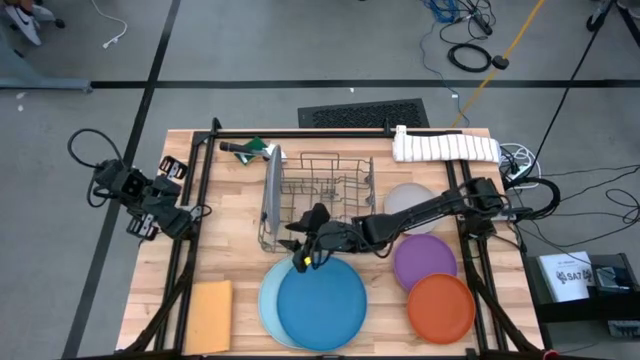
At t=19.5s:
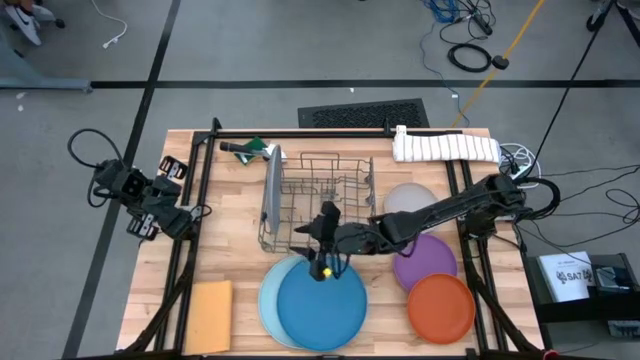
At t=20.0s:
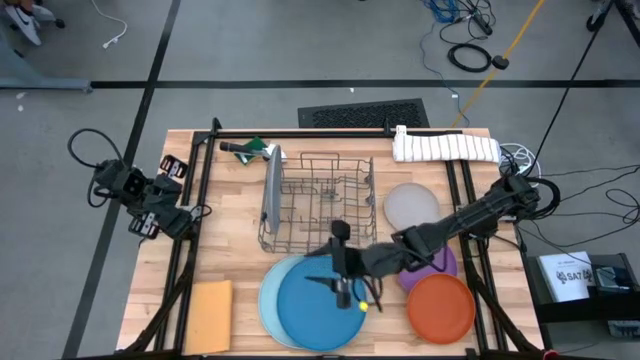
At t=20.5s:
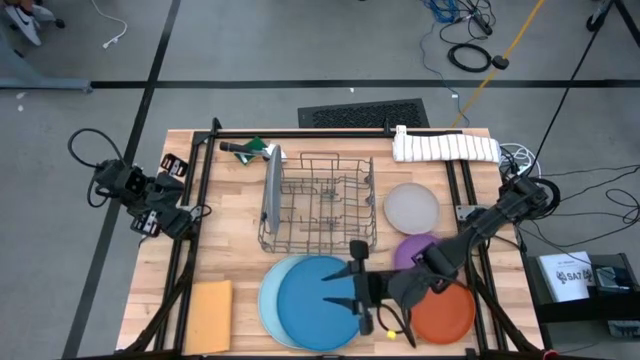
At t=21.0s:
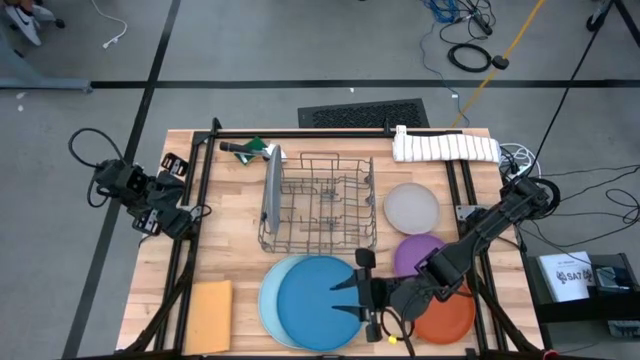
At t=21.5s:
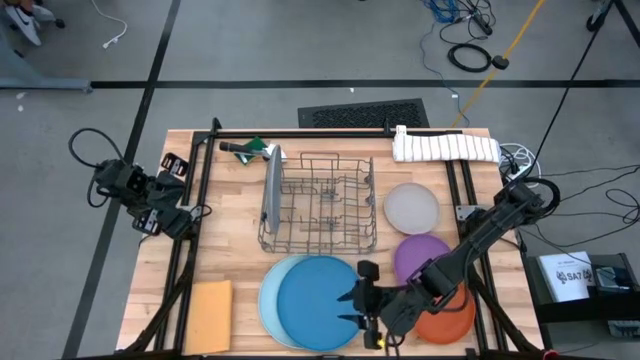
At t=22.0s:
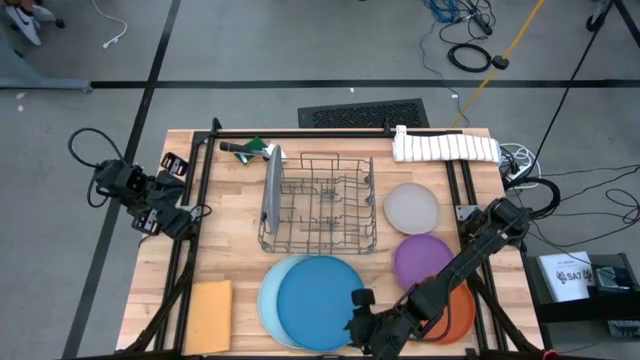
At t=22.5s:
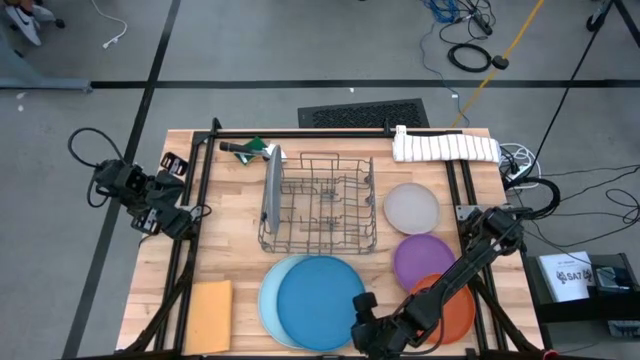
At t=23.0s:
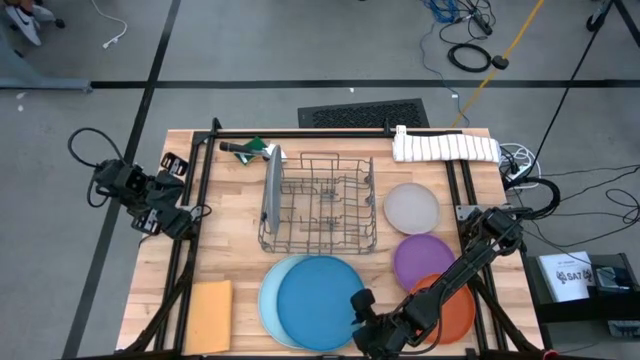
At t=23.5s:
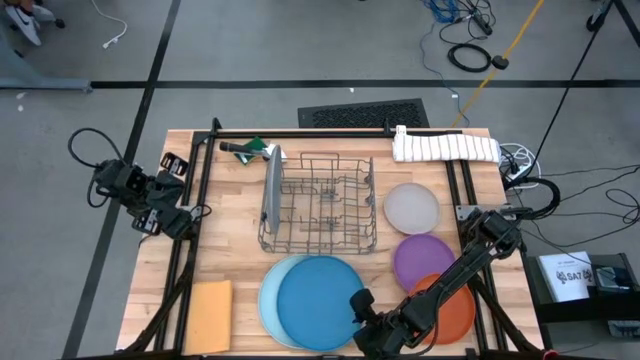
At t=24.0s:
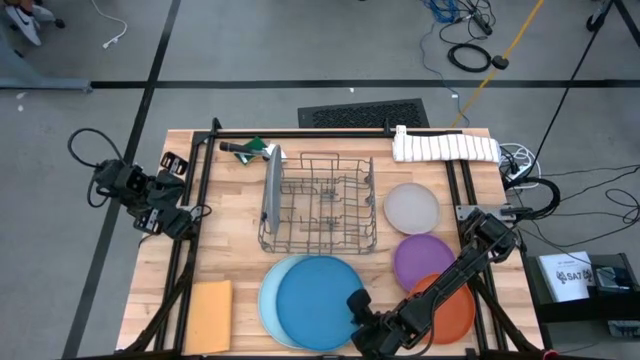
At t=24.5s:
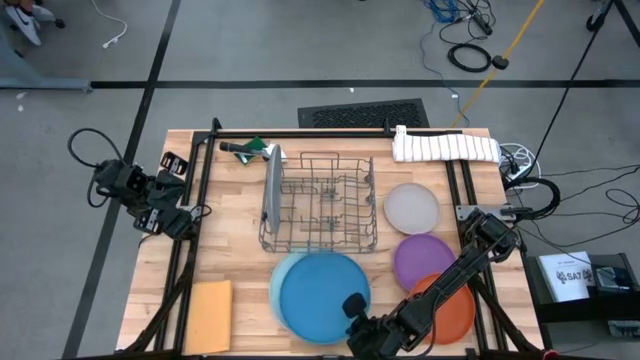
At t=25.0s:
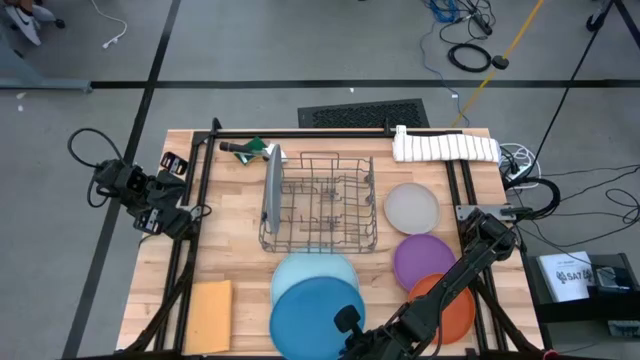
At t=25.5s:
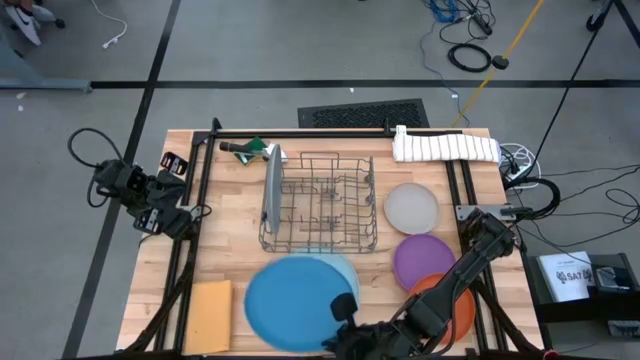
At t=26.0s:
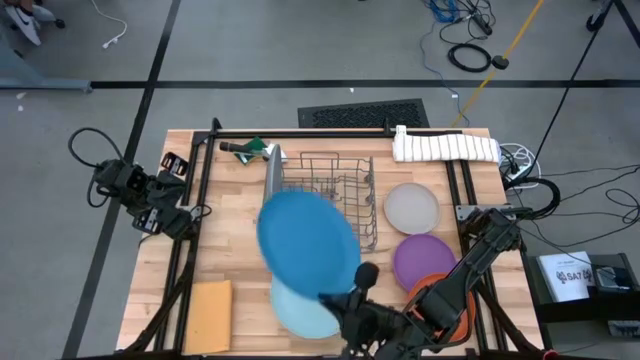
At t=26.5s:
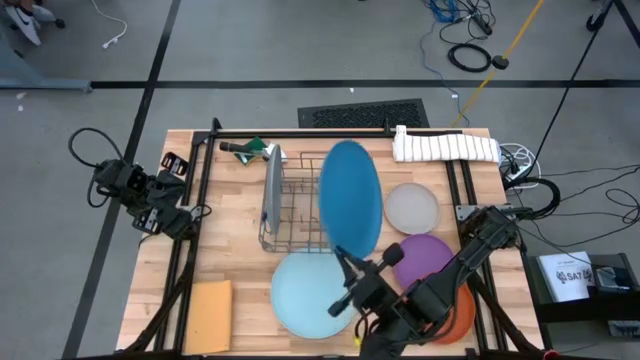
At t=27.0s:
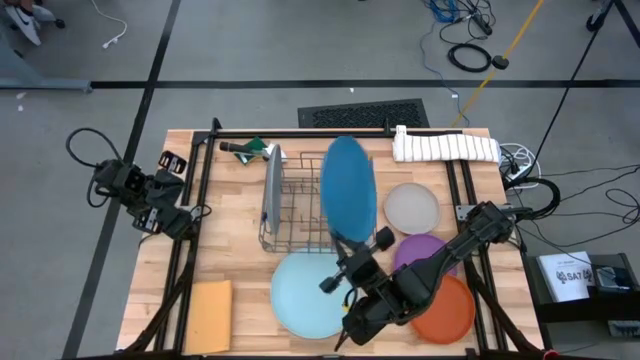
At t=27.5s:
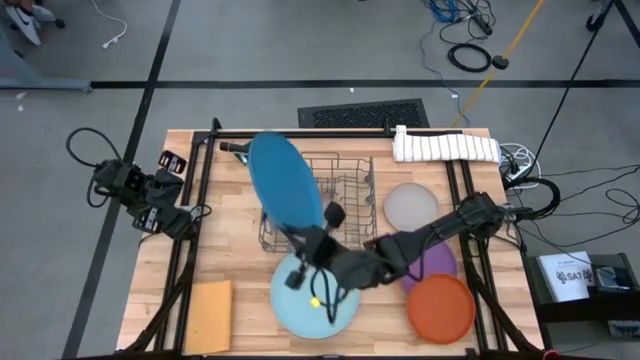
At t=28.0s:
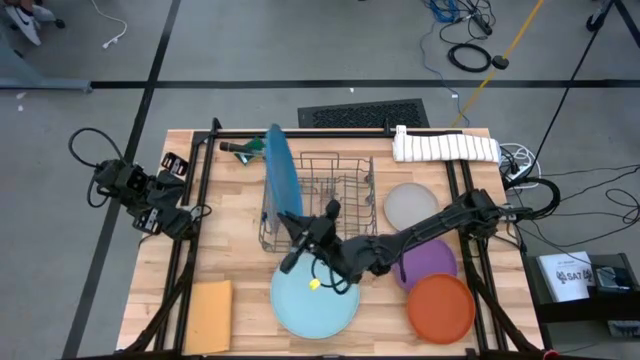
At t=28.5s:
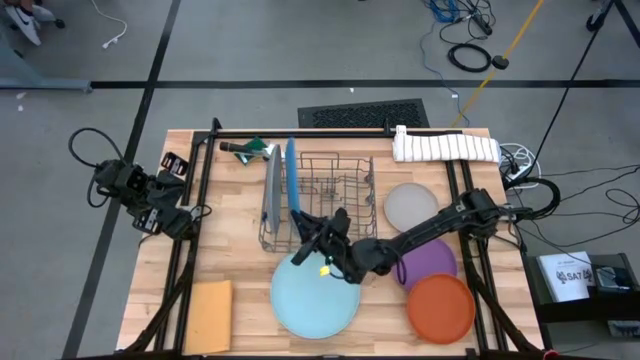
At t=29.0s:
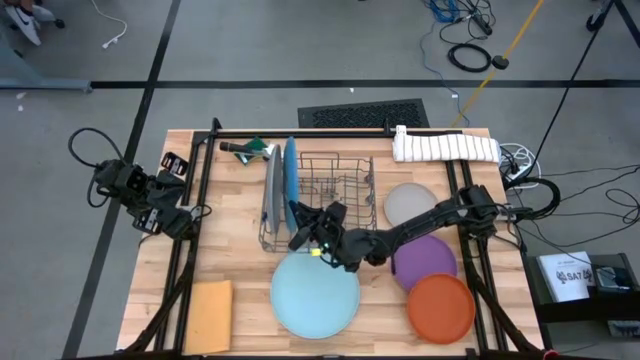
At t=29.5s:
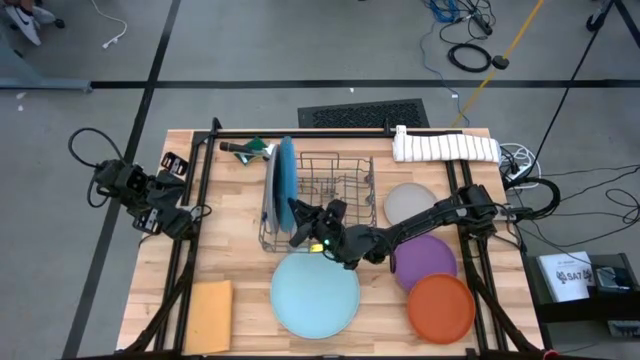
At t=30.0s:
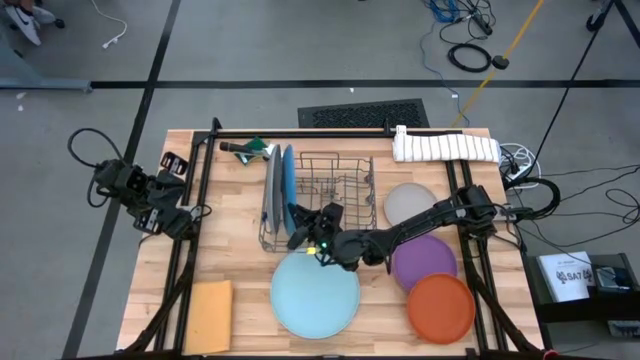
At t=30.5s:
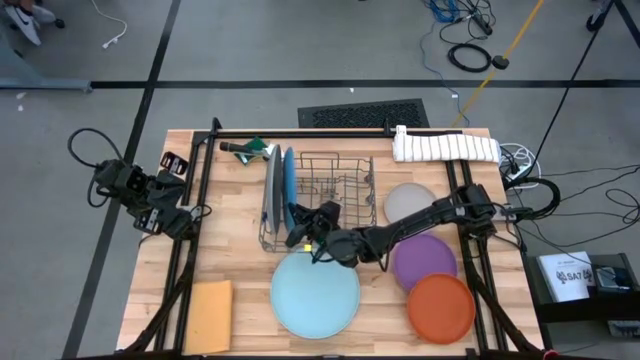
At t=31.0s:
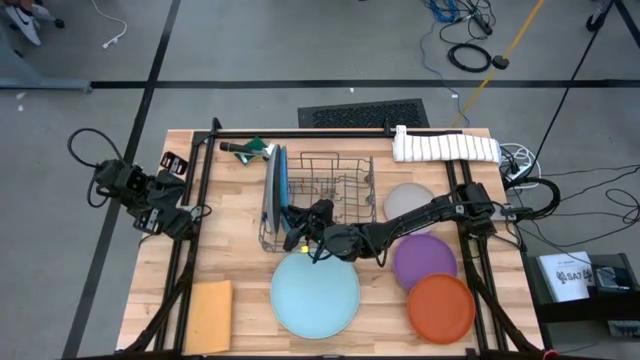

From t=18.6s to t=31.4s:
Task: Sort dishes
Put the blue plate into the green dish rack

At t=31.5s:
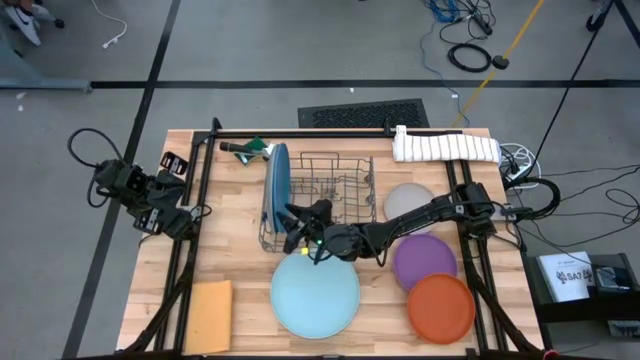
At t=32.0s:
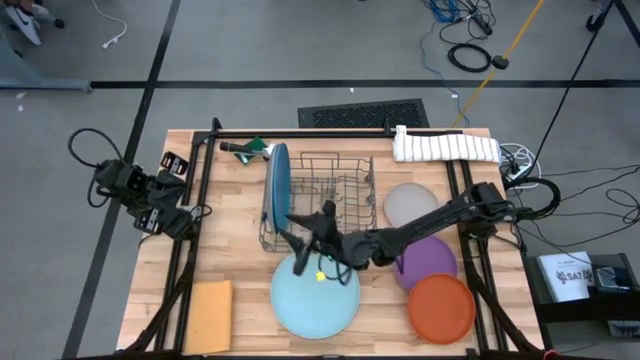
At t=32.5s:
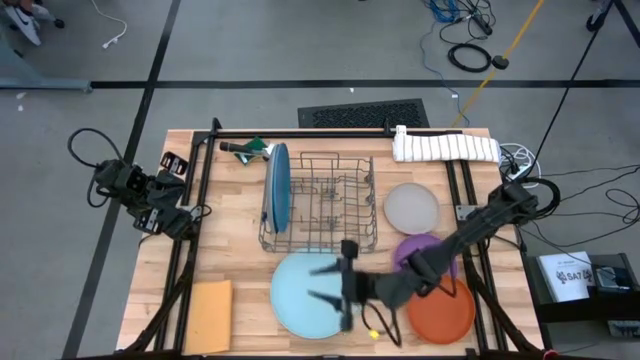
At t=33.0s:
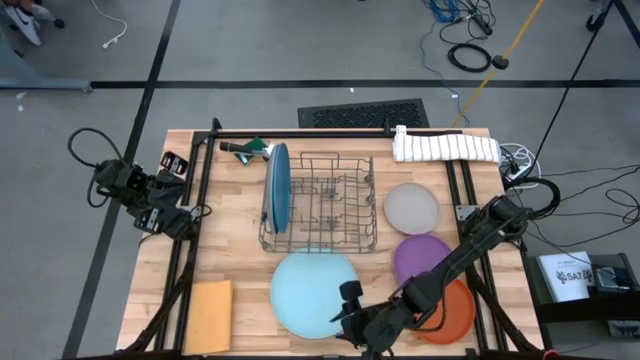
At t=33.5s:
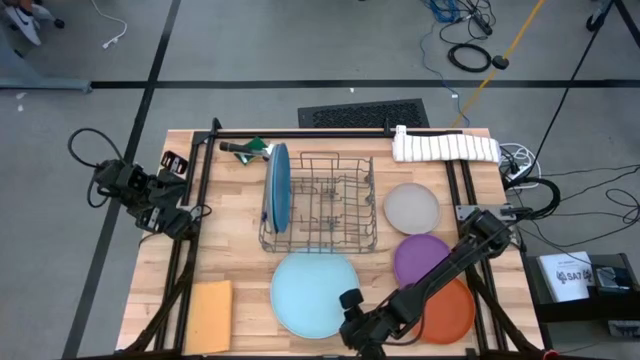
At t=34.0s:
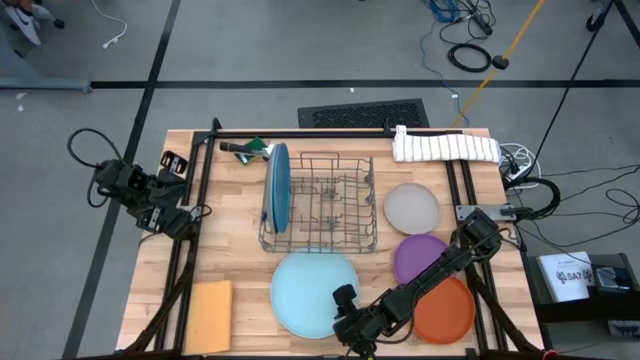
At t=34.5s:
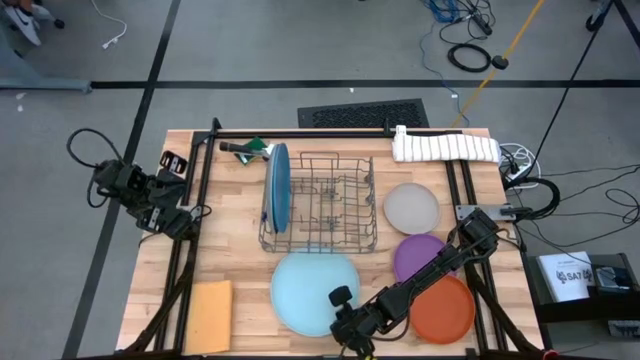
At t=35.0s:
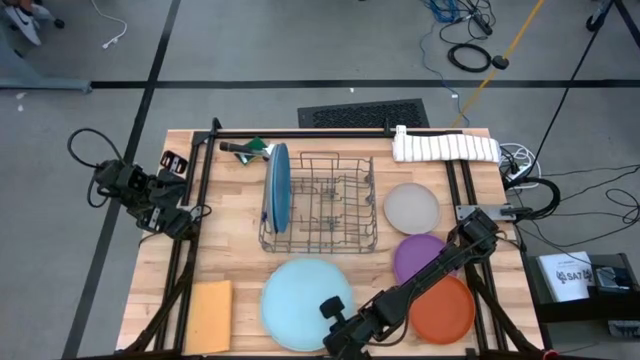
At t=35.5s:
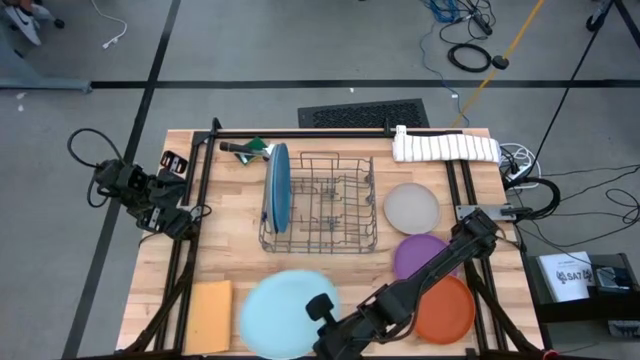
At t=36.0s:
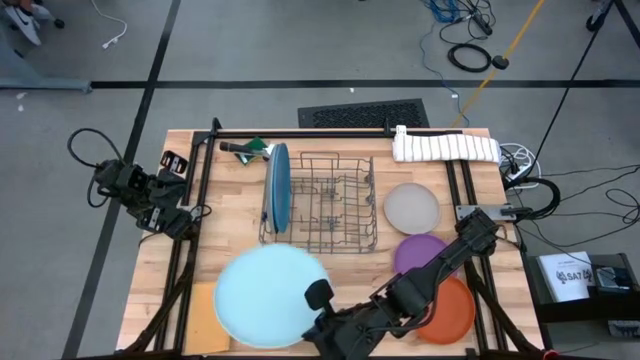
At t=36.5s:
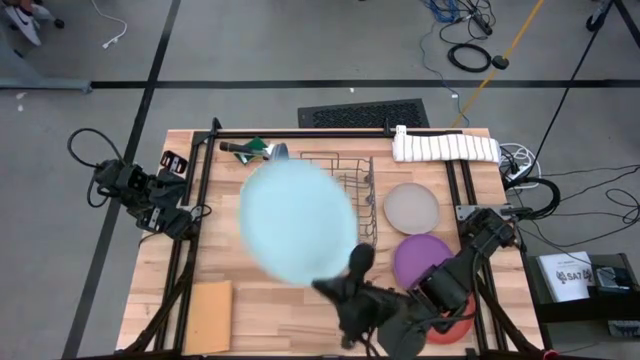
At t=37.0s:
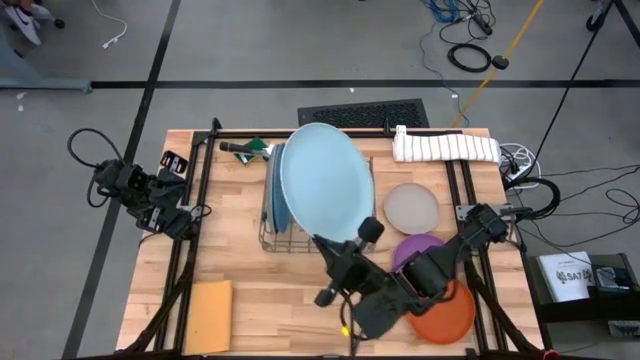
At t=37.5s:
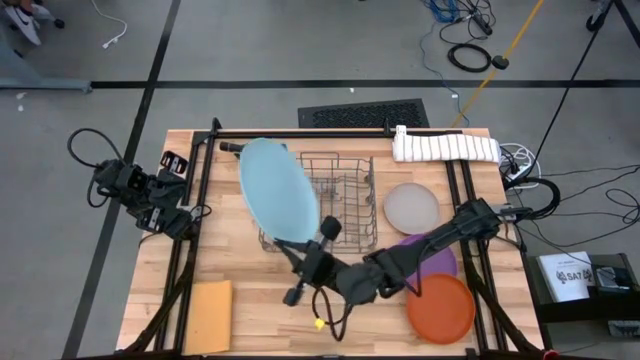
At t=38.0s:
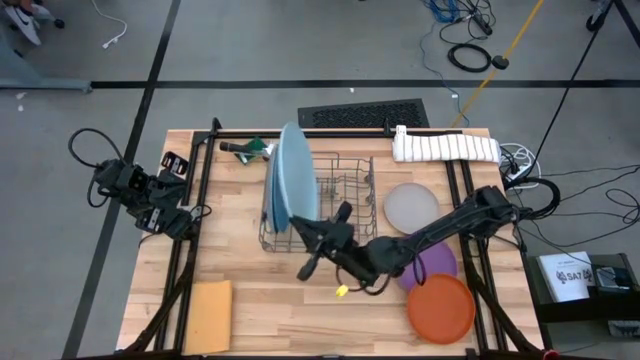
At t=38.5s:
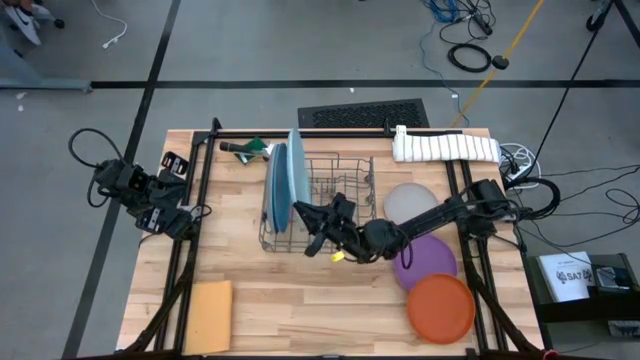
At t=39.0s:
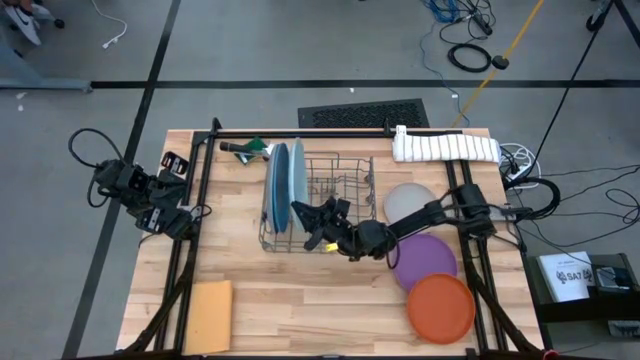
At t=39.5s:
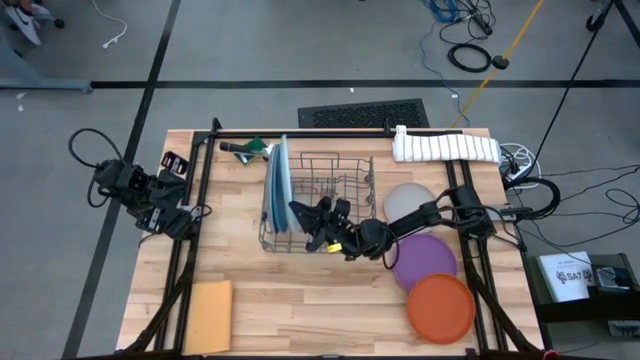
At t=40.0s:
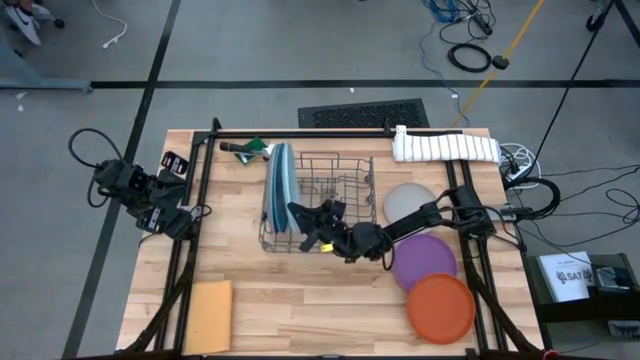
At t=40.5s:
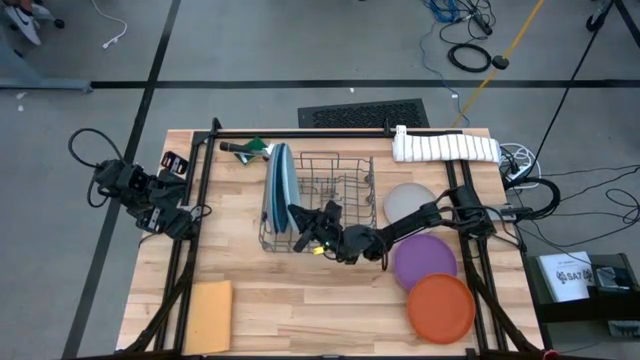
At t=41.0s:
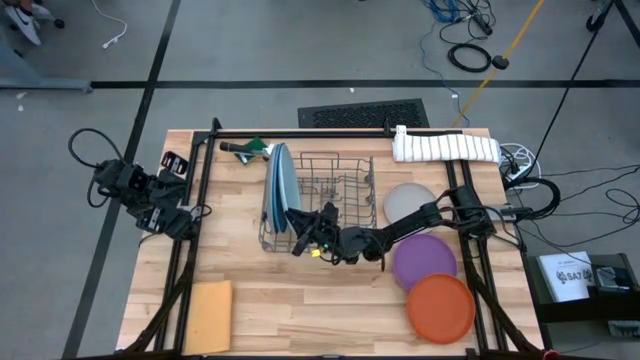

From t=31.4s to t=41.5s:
Put the light blue plate into the green dish rack
